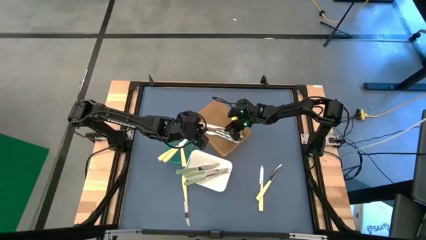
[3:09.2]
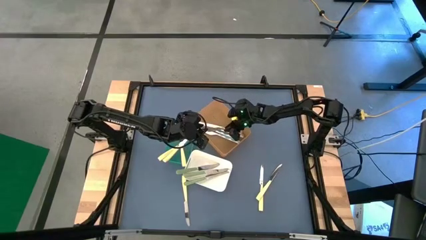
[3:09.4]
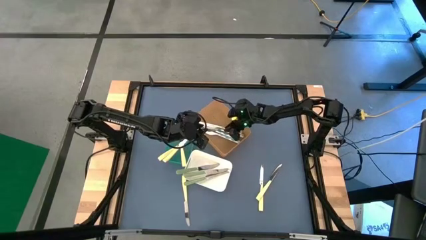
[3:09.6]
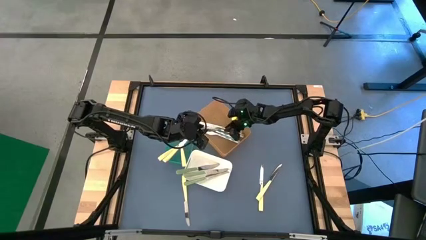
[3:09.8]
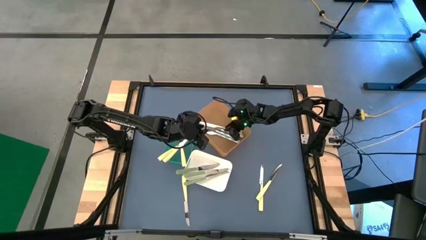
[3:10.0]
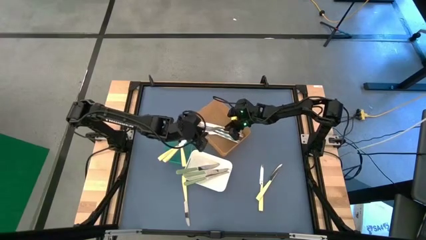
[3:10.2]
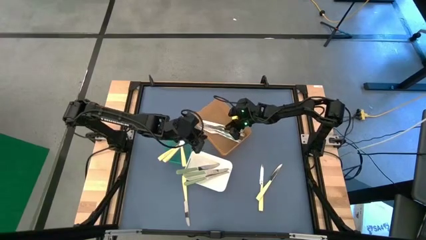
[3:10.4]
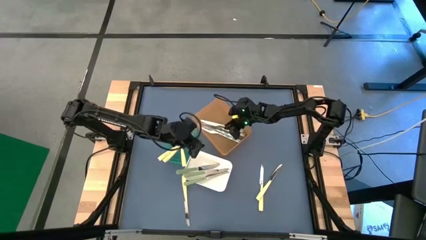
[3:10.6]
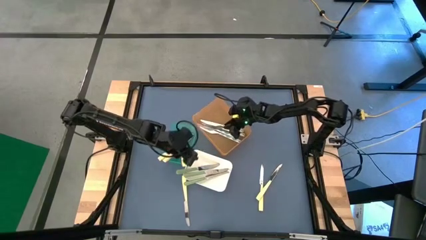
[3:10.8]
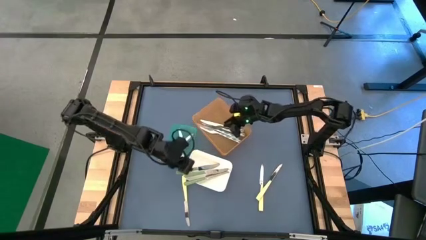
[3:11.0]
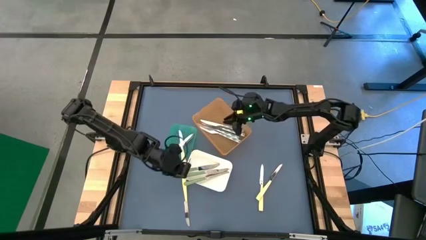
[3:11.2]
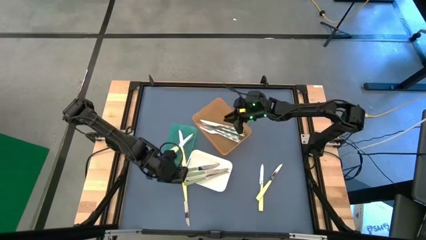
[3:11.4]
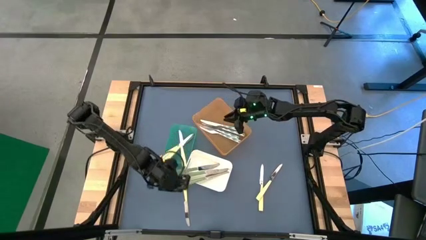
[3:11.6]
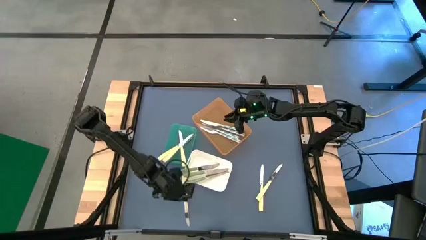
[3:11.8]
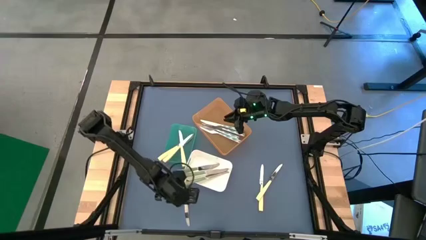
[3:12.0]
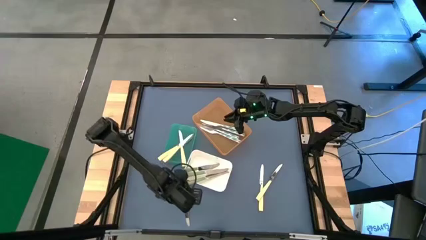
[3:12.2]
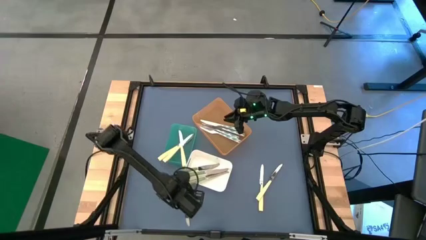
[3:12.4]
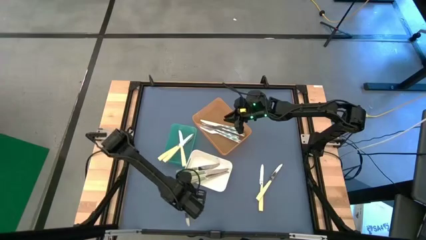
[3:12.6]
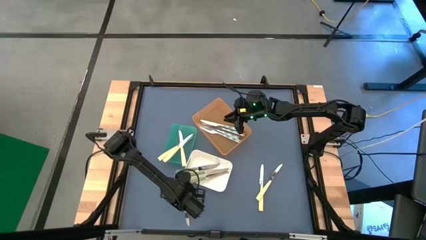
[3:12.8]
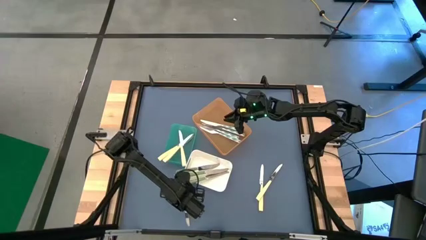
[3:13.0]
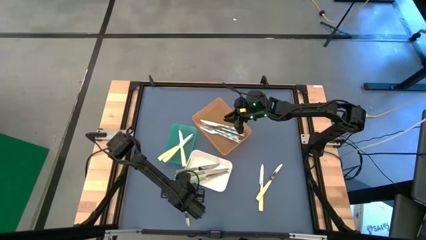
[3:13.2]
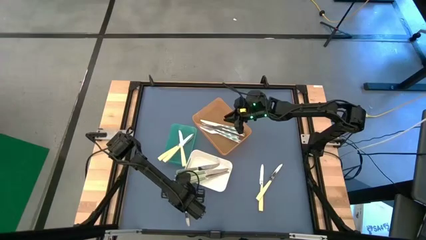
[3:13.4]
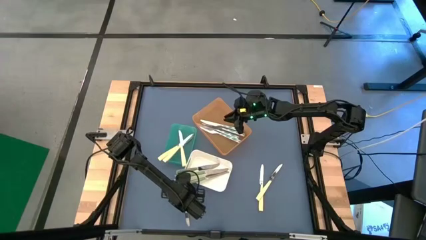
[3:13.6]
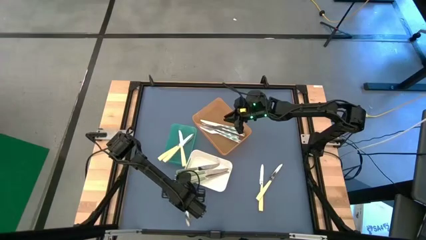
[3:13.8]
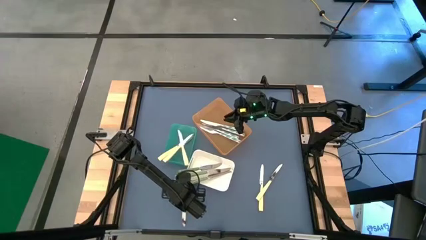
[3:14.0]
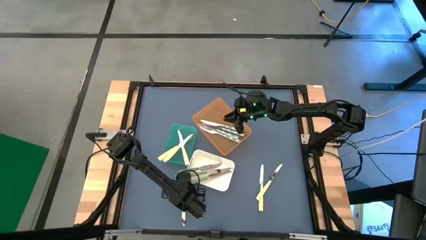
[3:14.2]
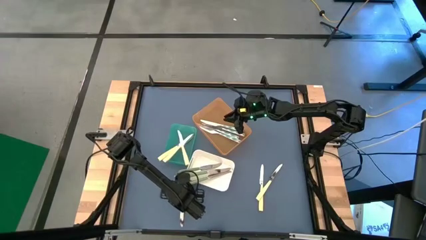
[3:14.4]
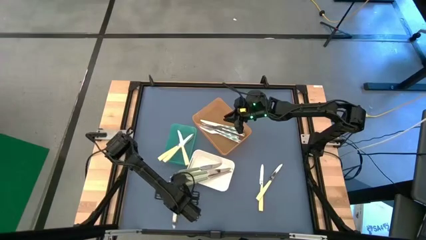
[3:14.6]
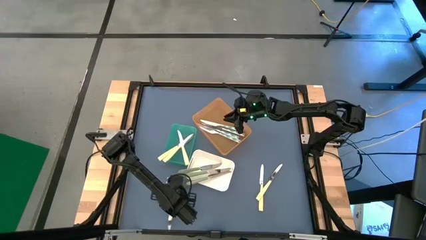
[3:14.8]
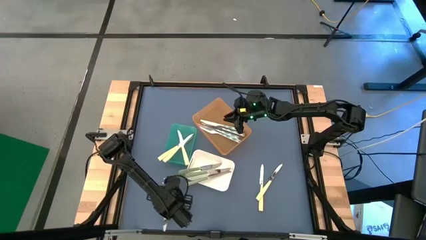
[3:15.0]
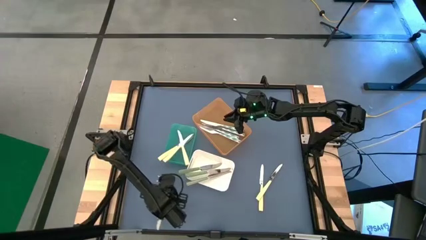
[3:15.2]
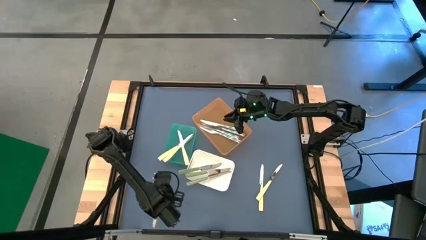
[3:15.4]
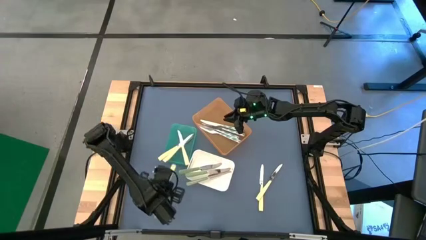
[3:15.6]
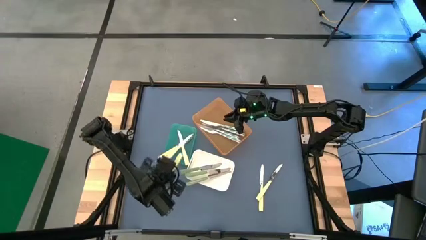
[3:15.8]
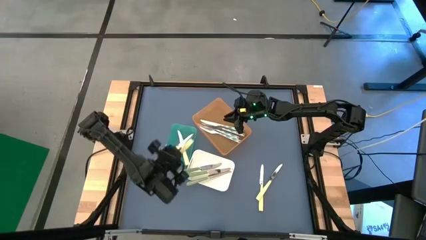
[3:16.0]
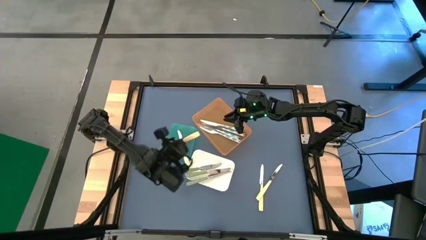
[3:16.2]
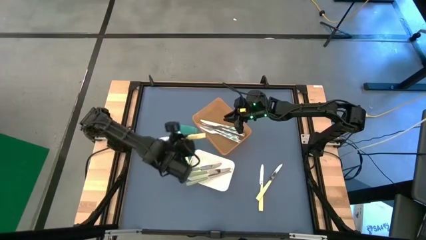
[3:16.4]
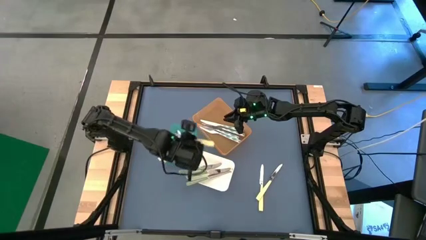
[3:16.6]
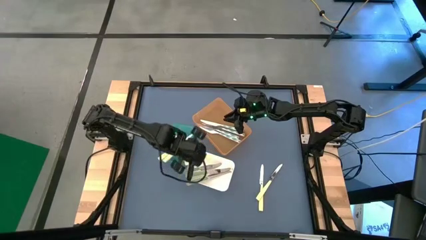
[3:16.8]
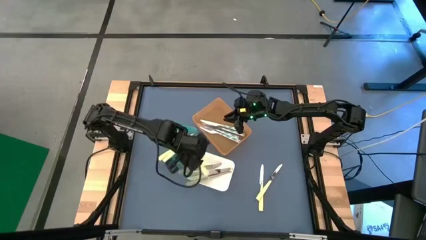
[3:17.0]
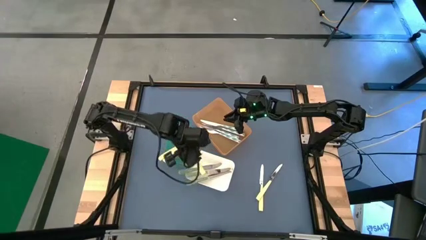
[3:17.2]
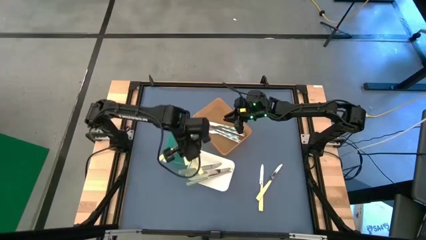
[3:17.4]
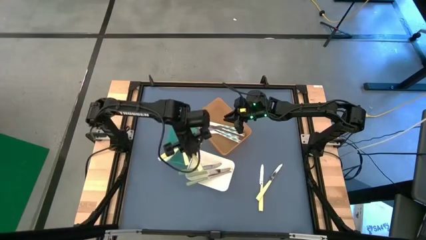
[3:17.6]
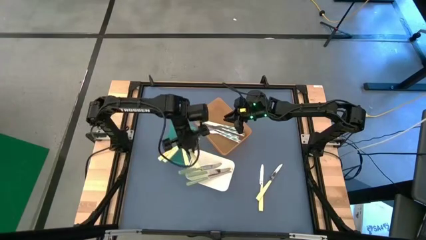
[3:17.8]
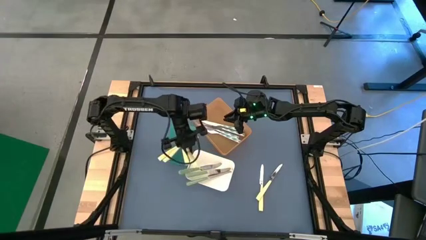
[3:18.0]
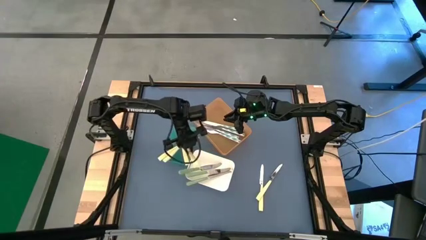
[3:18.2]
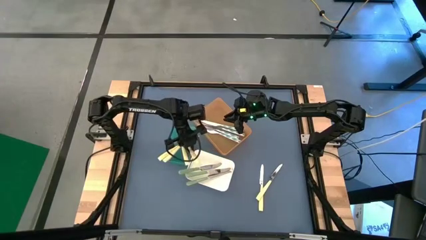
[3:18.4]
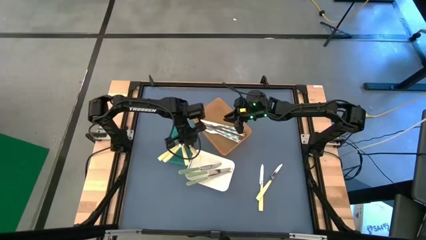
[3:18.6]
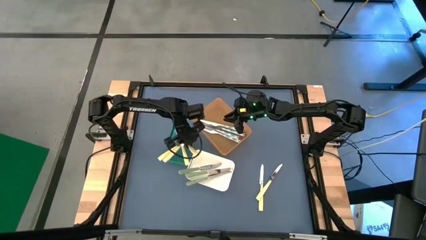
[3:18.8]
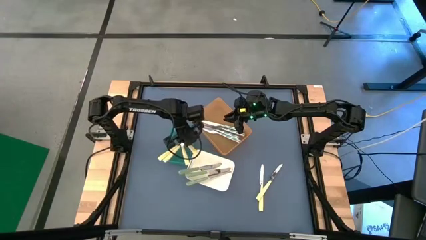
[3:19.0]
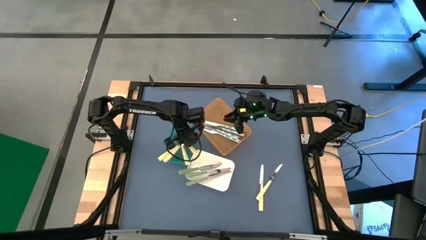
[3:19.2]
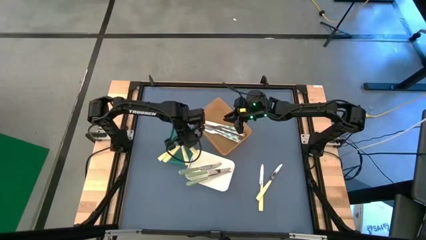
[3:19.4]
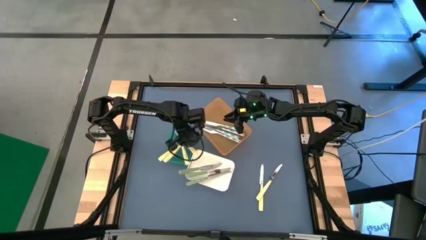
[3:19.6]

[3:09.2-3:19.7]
Task: Sort silverware by color (type)
Put the yellow table knife into the green bin

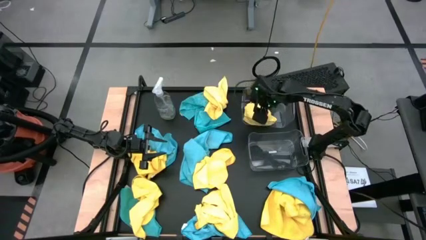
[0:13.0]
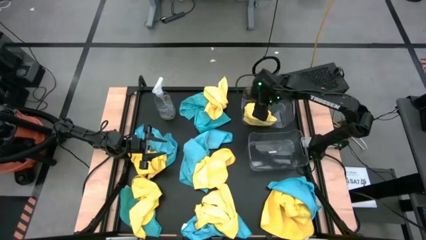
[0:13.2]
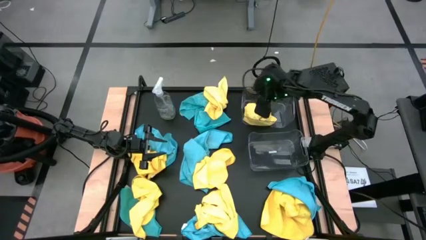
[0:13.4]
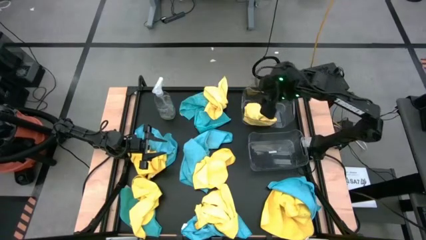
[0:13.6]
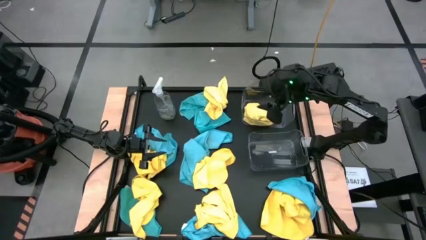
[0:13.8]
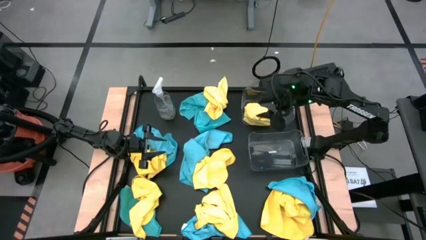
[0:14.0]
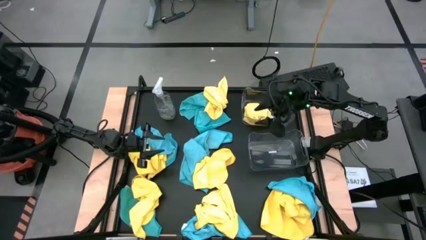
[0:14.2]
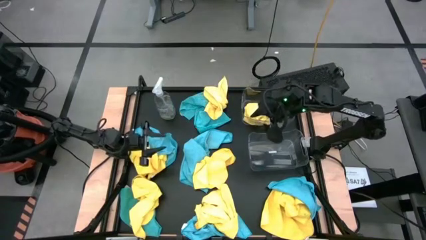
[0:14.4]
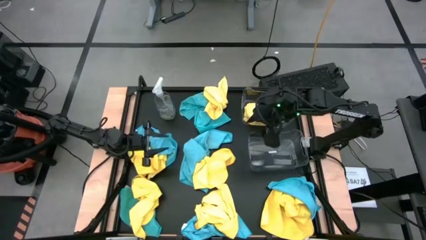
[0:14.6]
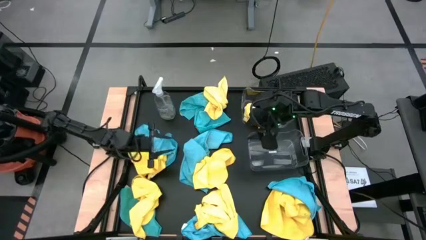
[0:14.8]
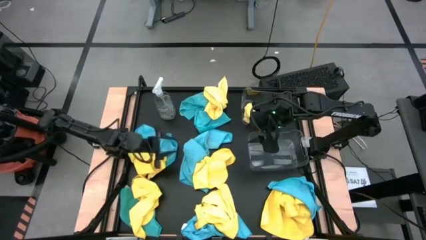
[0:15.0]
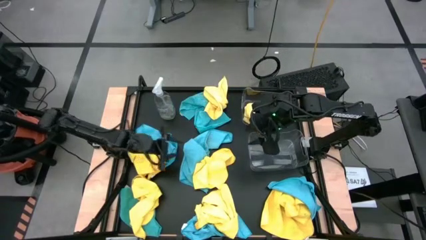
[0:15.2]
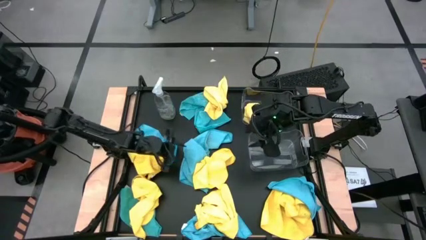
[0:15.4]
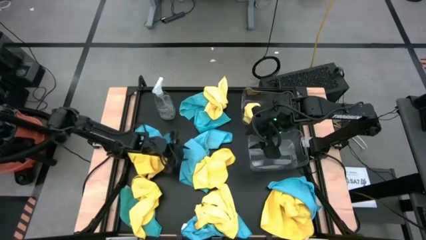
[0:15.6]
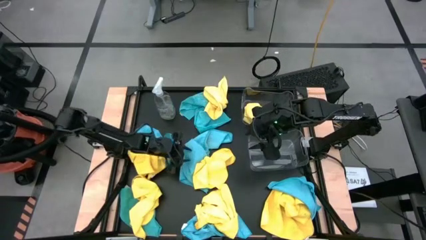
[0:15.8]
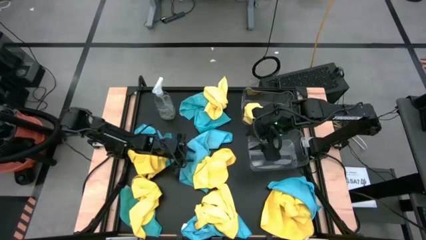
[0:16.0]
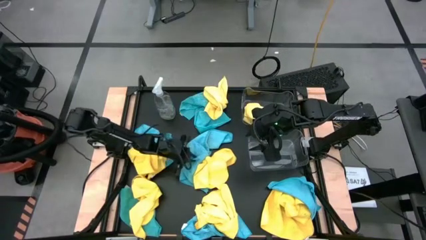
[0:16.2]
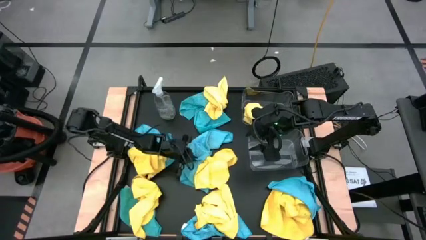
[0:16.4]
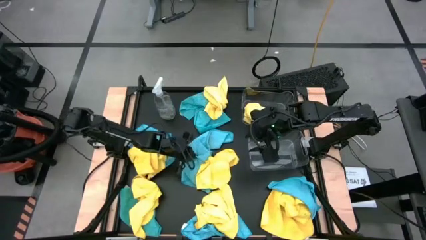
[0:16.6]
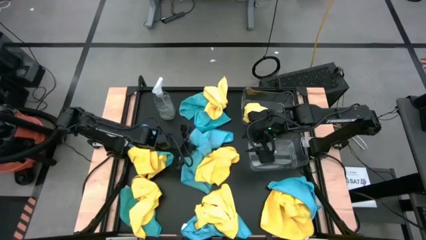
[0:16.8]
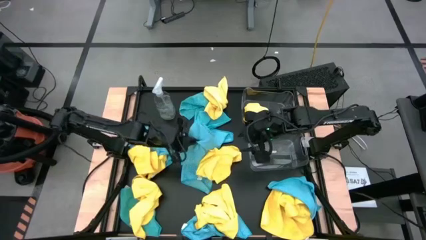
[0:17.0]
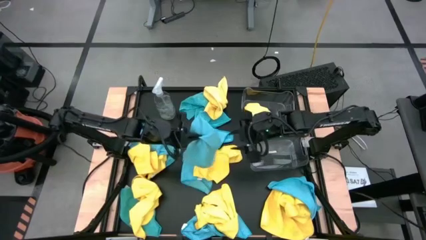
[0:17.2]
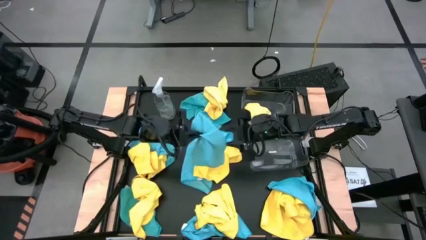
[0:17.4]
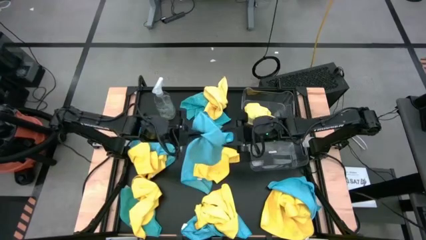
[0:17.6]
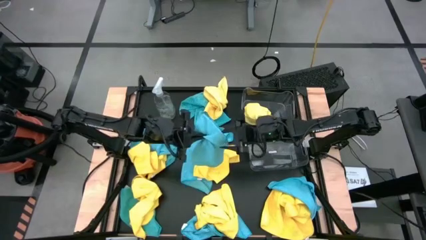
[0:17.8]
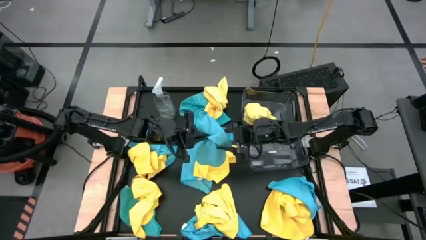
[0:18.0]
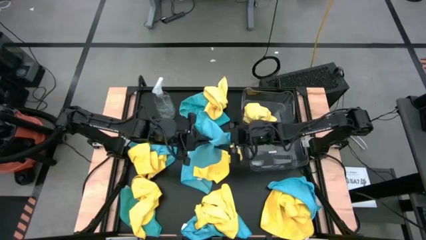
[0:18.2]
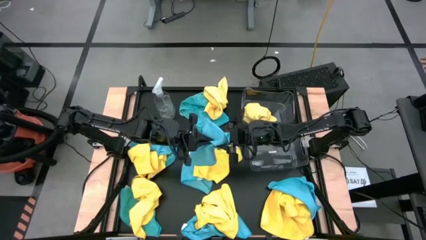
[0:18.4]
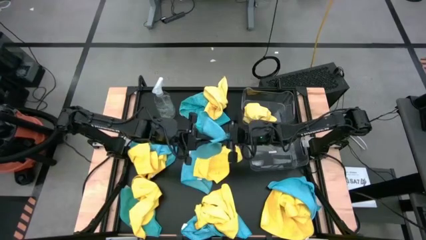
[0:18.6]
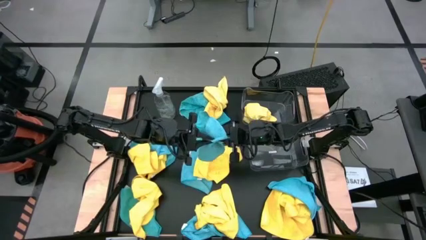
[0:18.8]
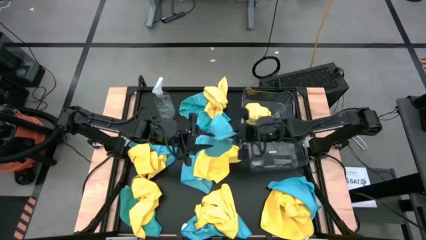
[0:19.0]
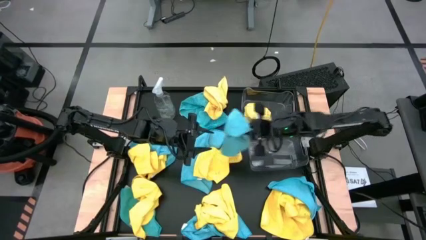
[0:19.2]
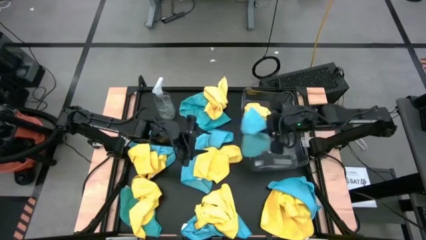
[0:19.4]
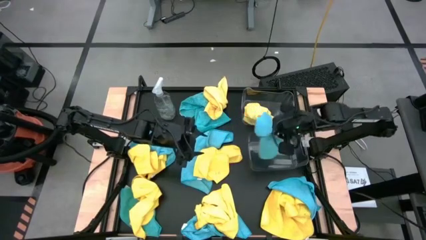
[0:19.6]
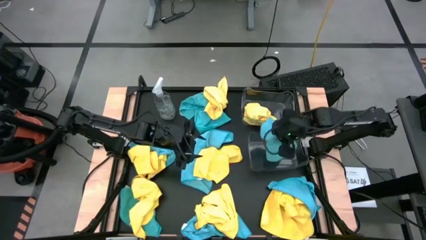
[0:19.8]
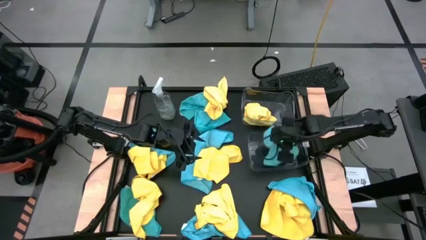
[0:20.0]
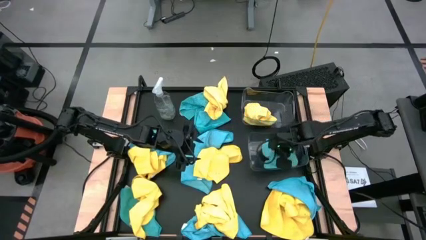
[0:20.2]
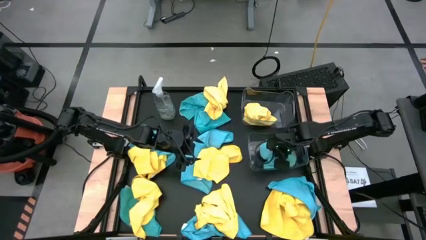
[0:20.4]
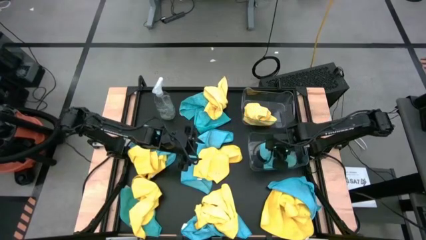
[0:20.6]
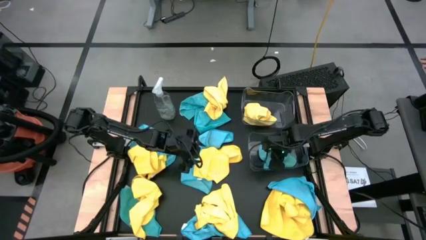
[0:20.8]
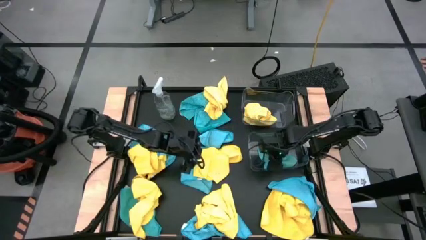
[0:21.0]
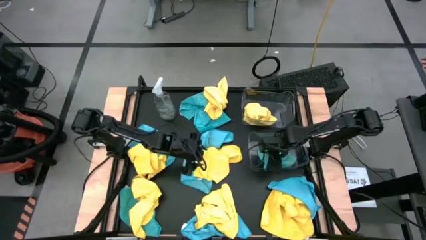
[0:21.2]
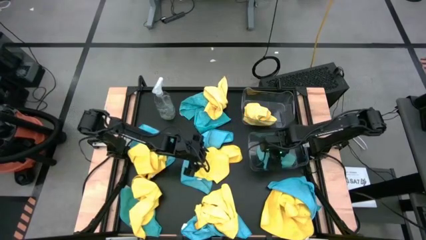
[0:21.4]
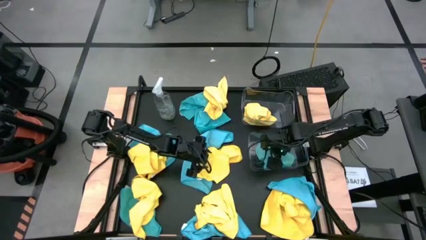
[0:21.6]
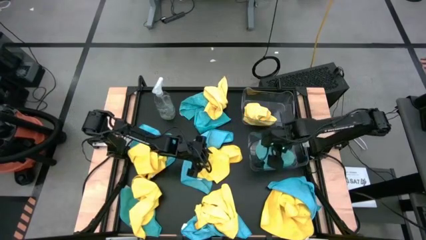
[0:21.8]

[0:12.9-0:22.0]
Task: Sort microfiber towel by color & place in baskets
Put the blue microfiber towel into the bottom transparent bin
